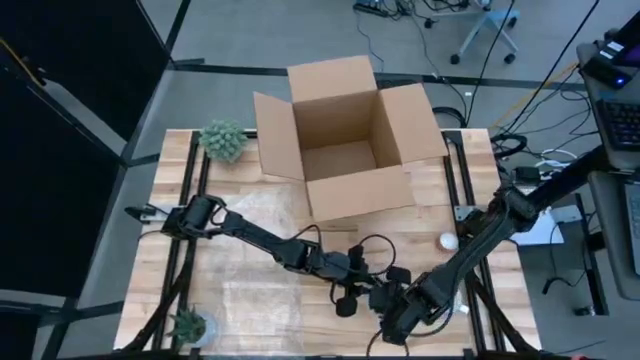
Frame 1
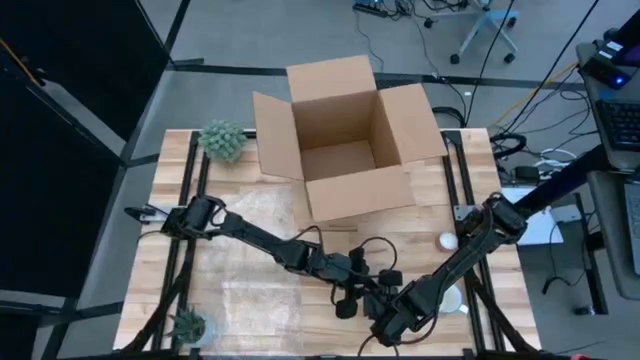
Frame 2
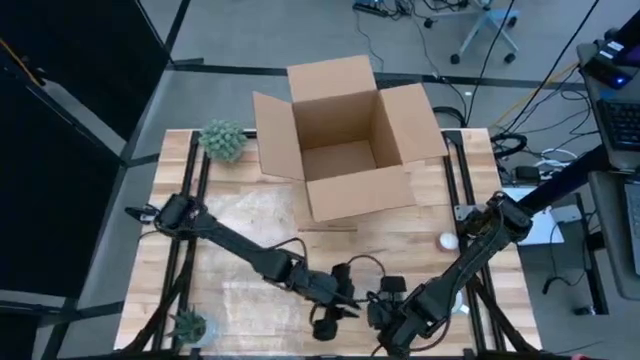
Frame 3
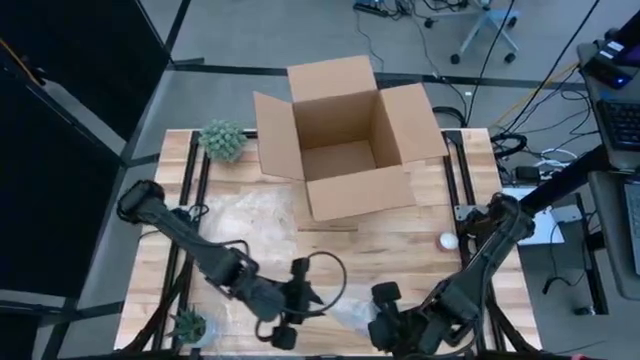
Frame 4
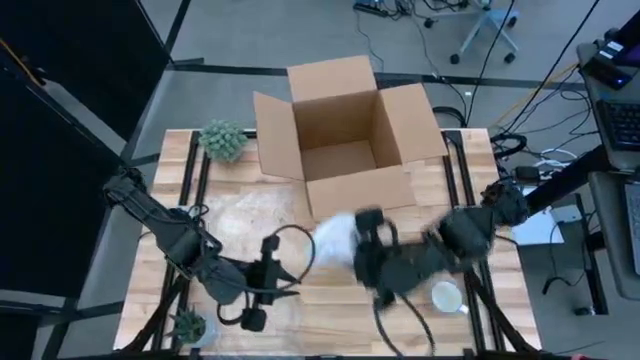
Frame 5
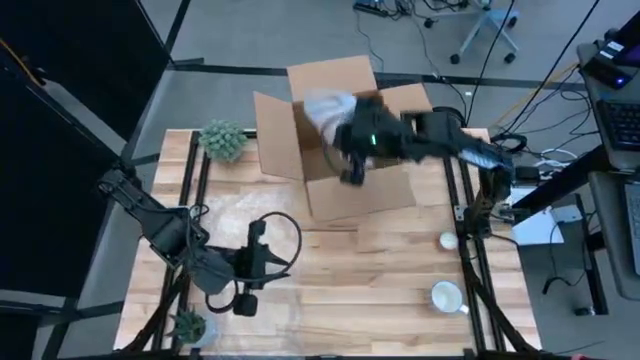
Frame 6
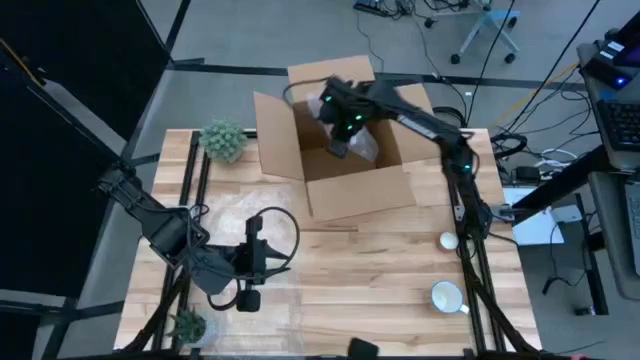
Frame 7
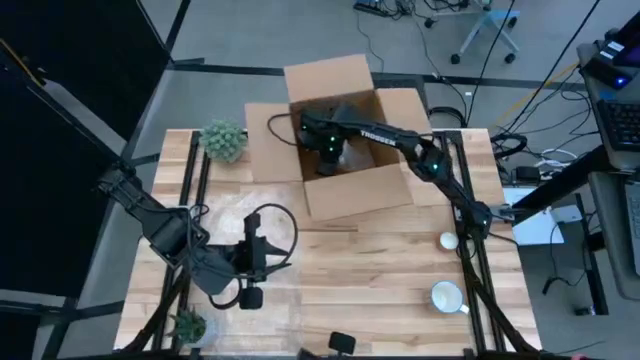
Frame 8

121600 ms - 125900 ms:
Task: wrap mug
Put the orange mug into the cardboard box

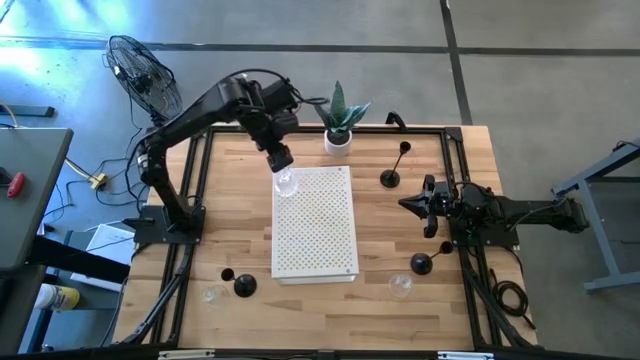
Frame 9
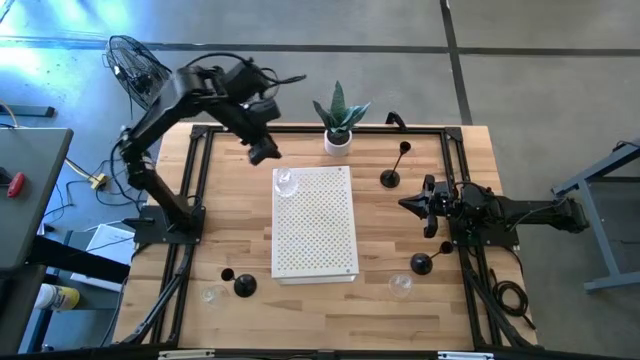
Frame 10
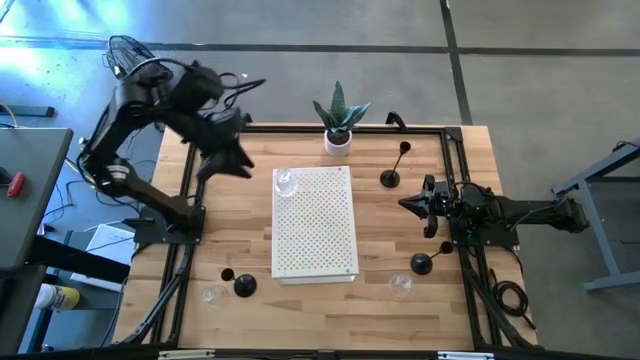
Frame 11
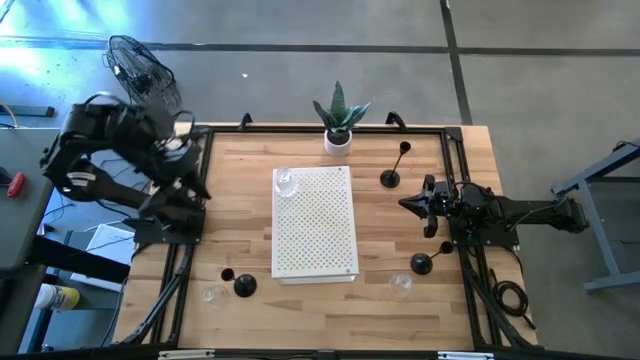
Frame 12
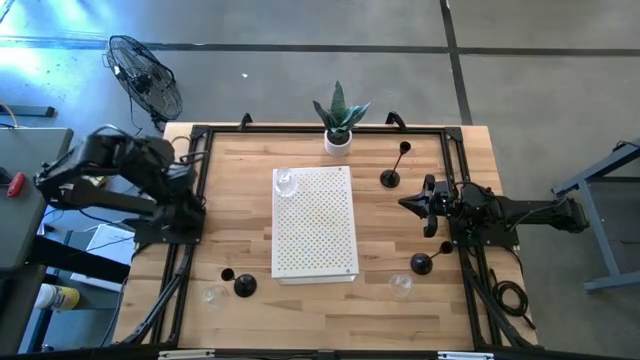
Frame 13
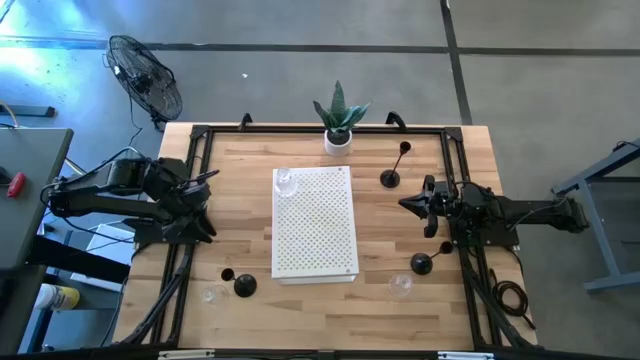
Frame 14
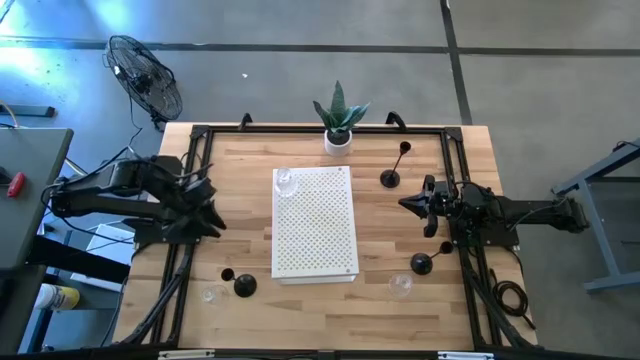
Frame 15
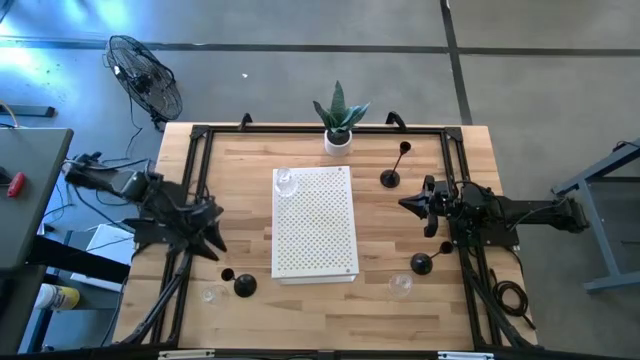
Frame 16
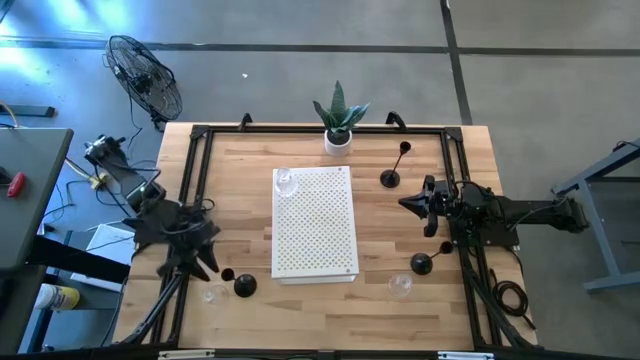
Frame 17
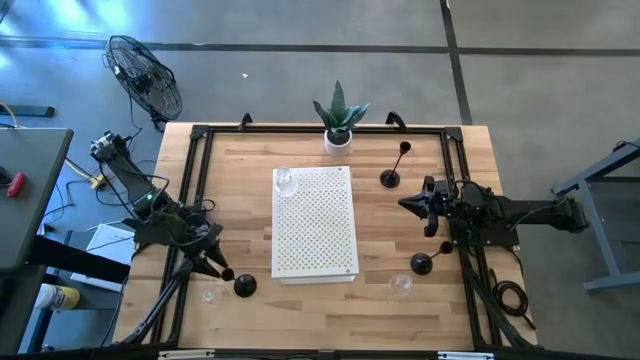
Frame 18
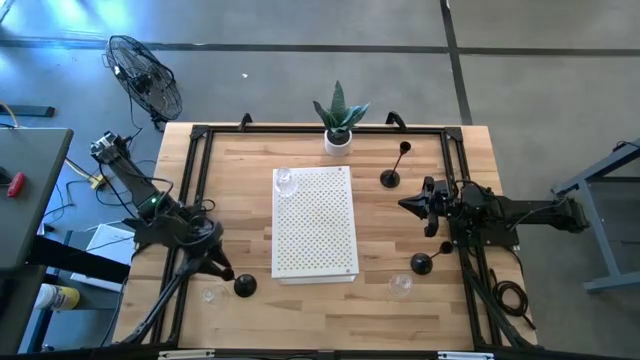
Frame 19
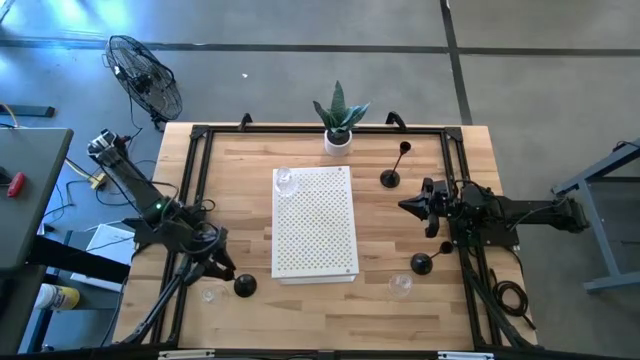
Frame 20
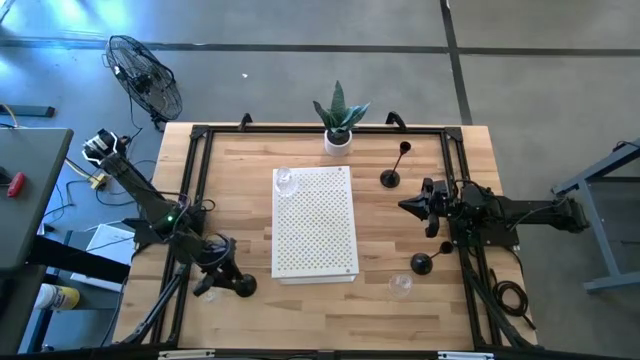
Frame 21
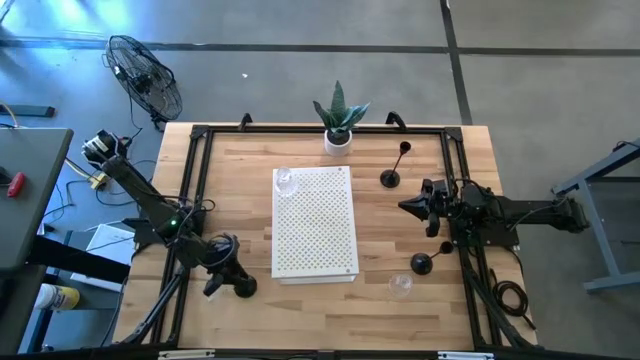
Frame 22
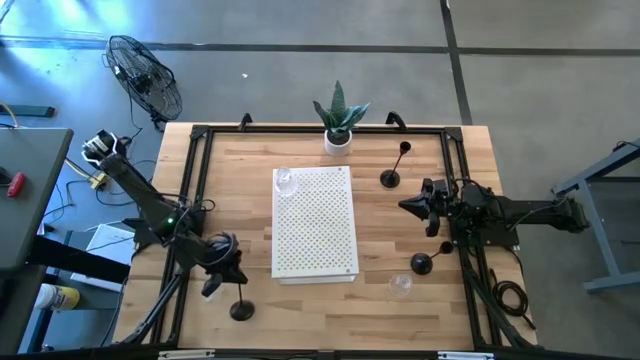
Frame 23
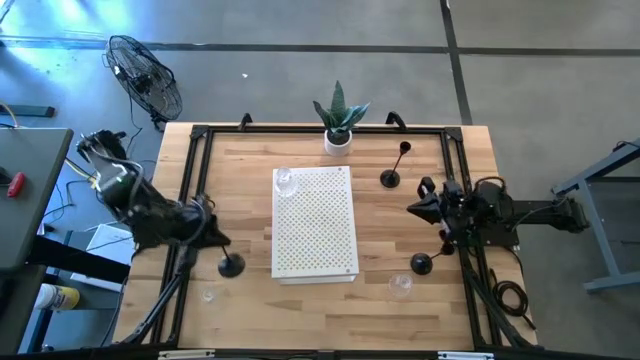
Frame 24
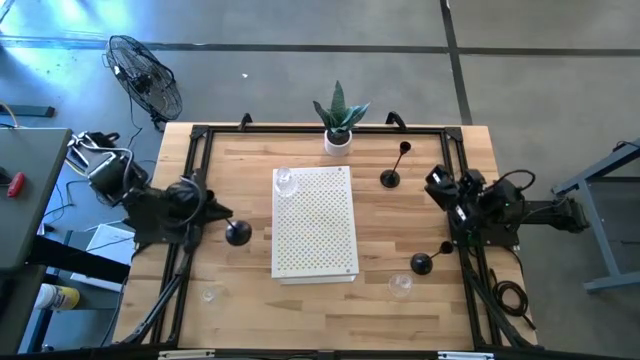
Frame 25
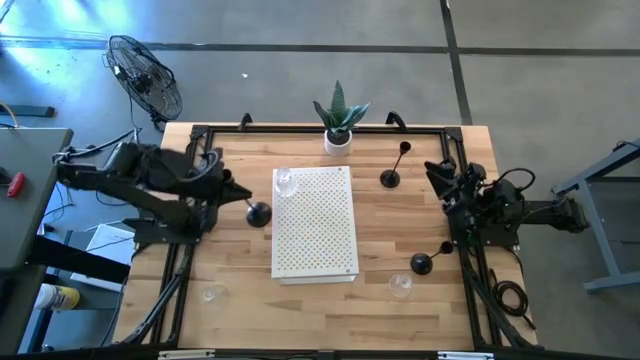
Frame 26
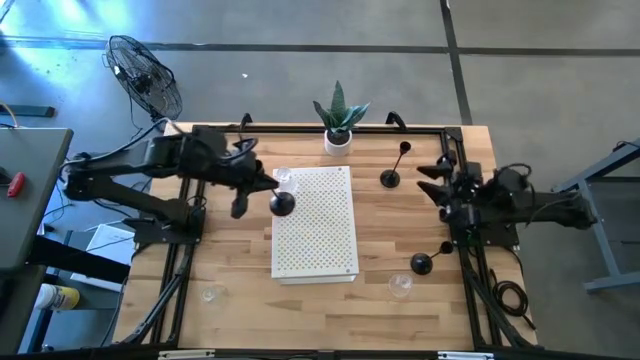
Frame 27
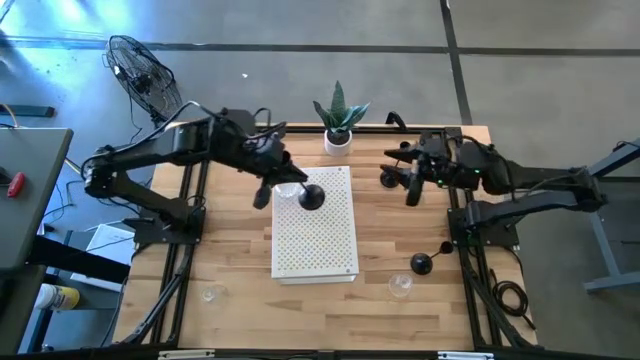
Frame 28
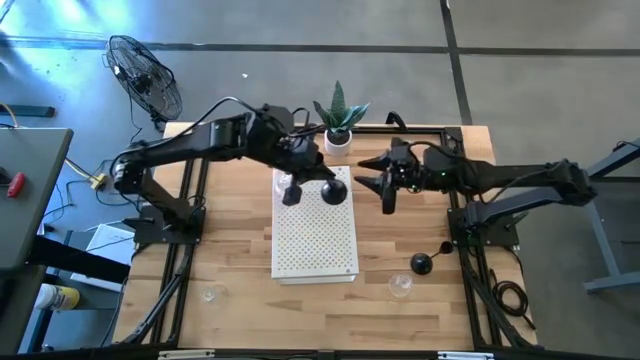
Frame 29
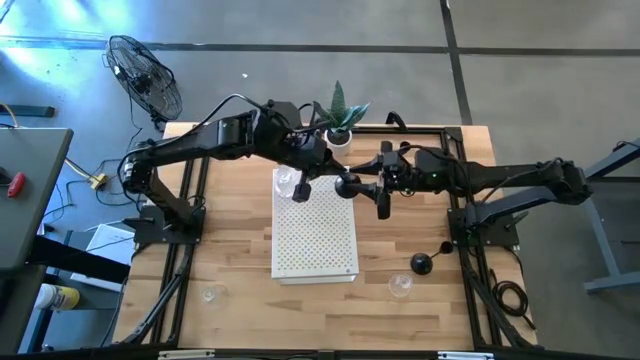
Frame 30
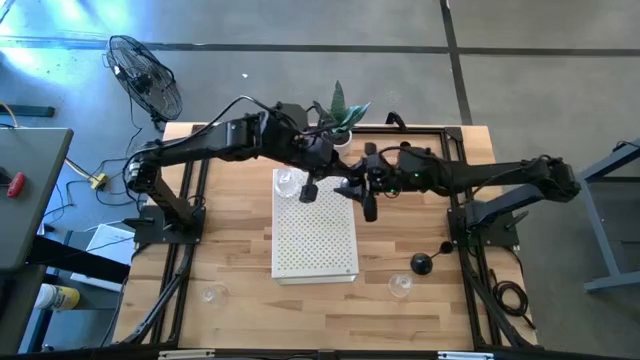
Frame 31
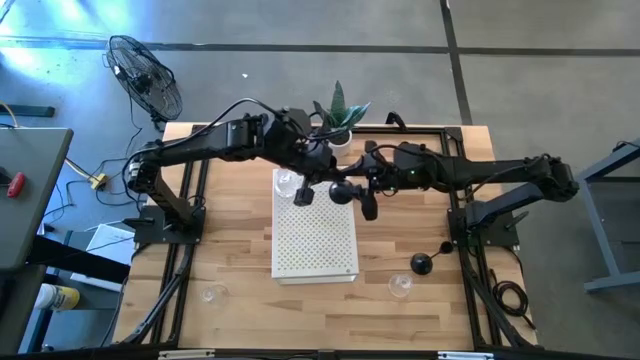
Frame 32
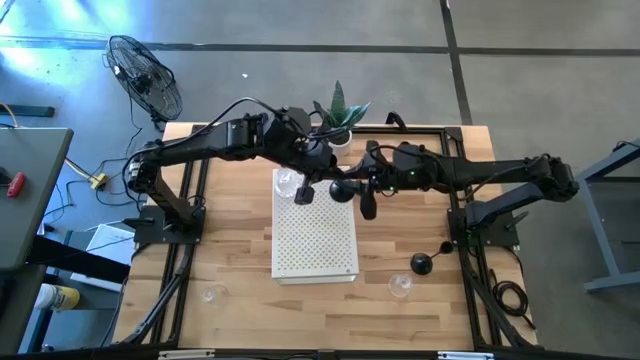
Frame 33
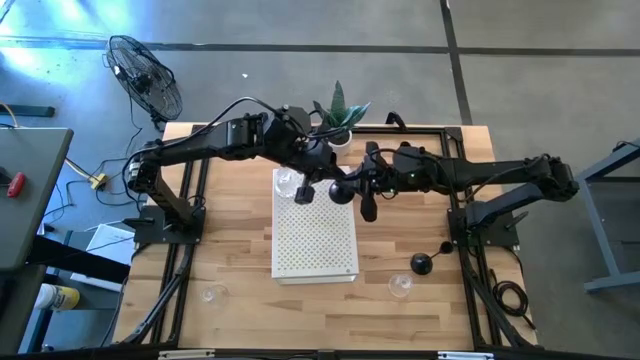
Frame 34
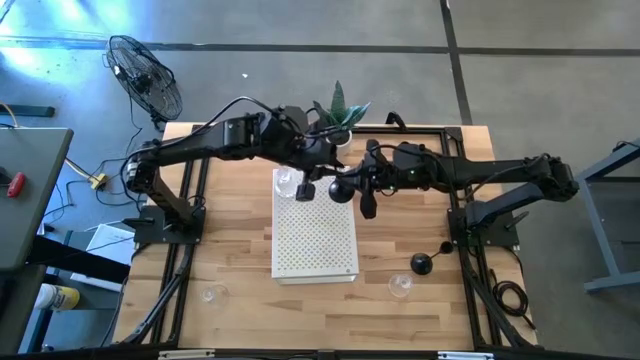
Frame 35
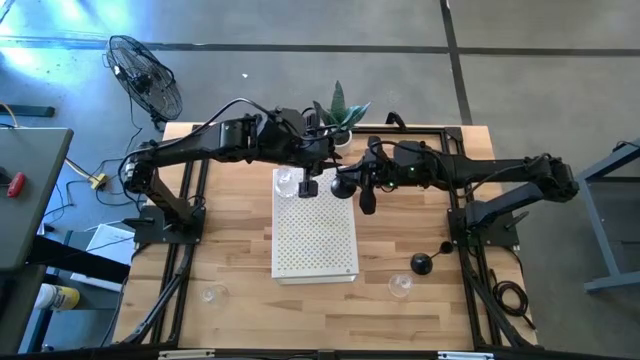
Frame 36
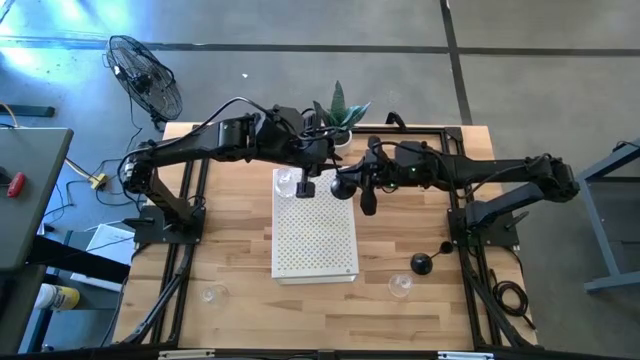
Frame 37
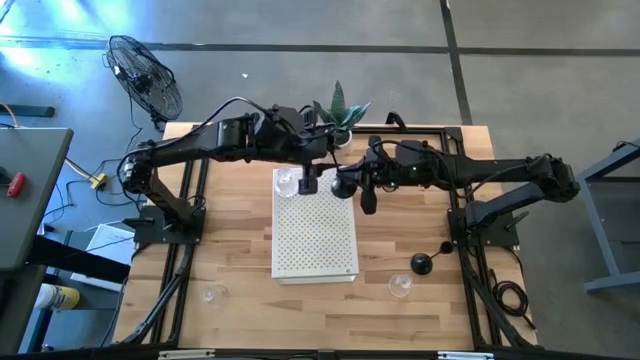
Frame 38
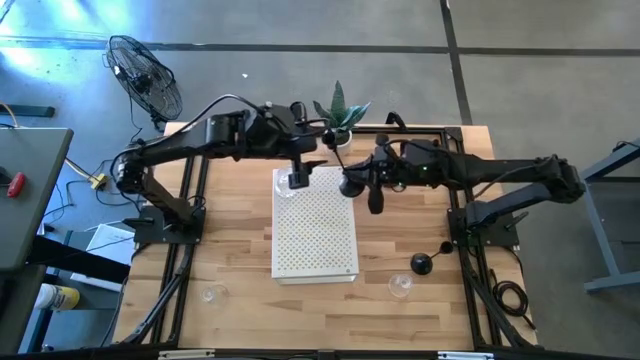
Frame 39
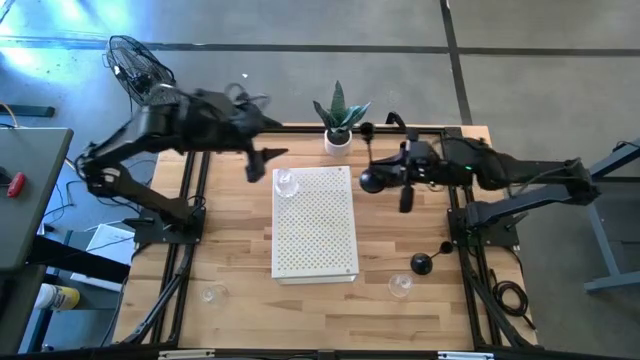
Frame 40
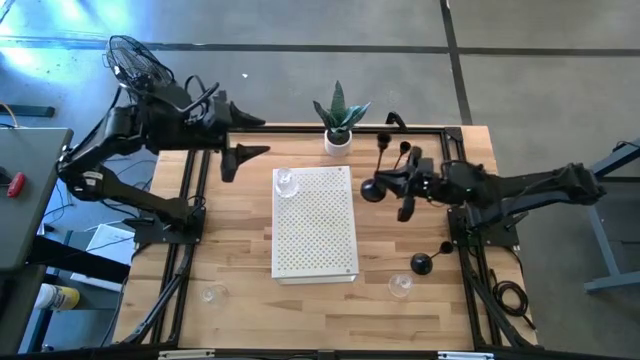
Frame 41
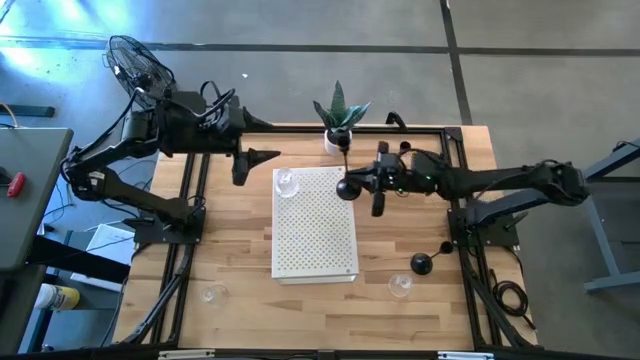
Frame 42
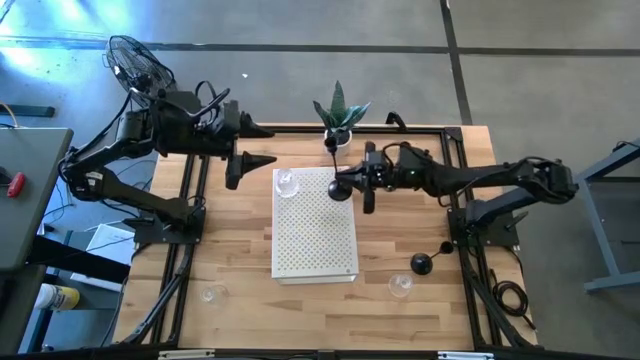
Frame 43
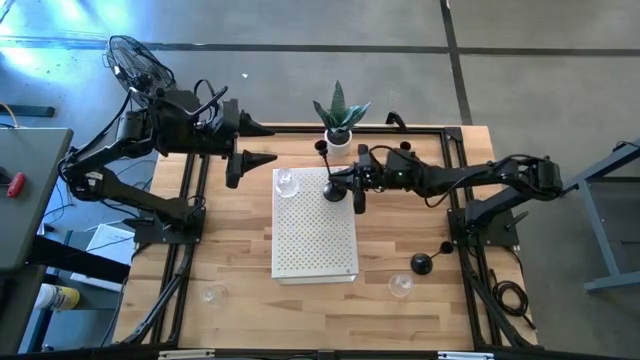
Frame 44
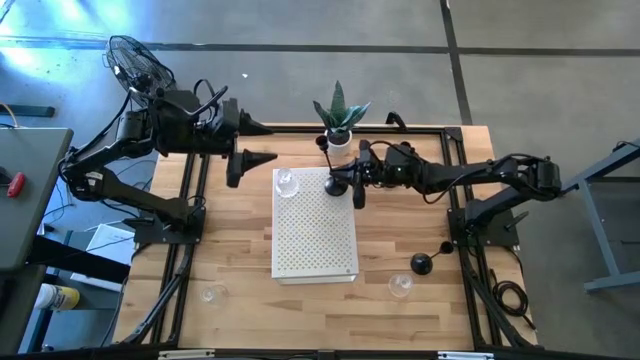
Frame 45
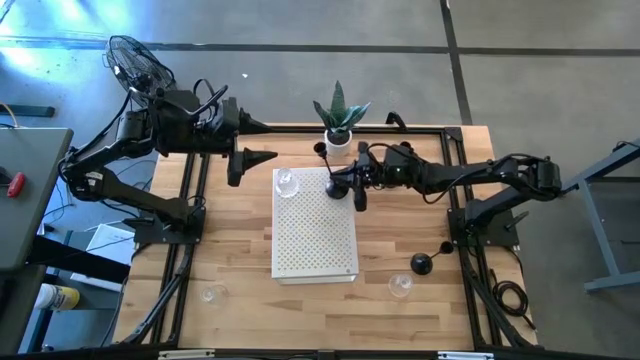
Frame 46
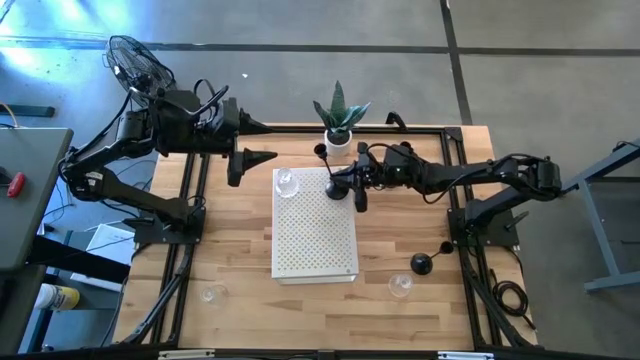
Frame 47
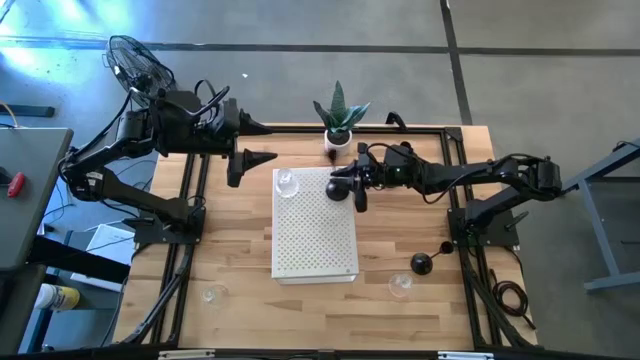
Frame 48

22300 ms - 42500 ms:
Task: Pick & Place candle stick holders
Put the bottom left black candle holder on the shelf
